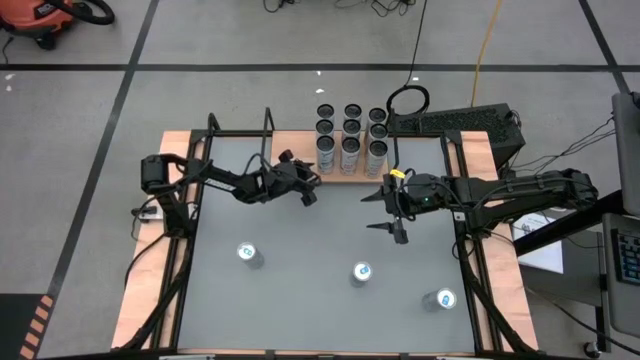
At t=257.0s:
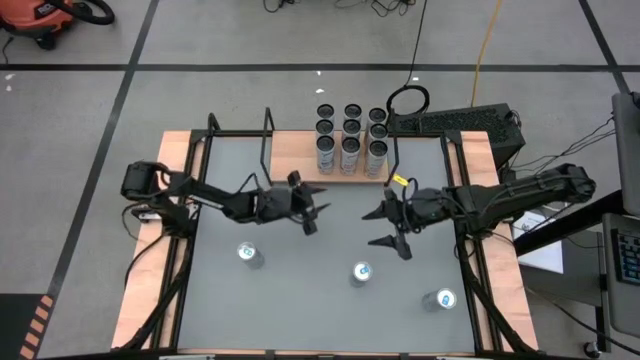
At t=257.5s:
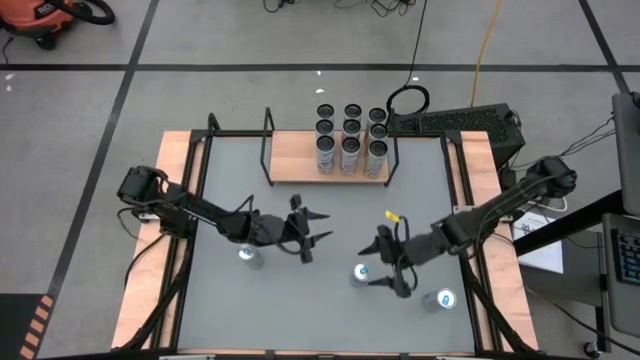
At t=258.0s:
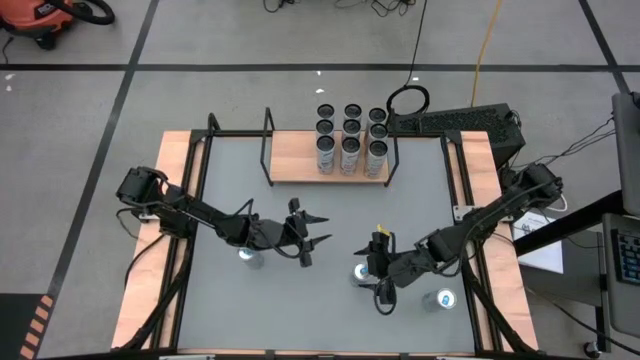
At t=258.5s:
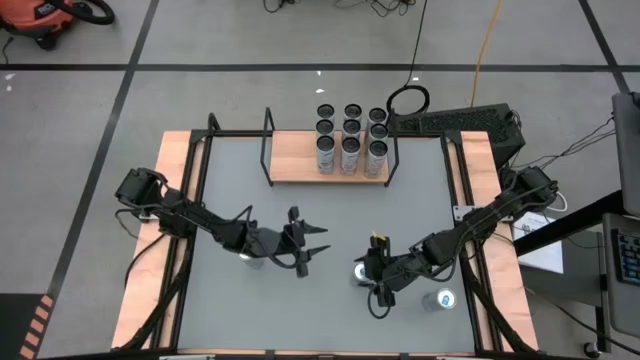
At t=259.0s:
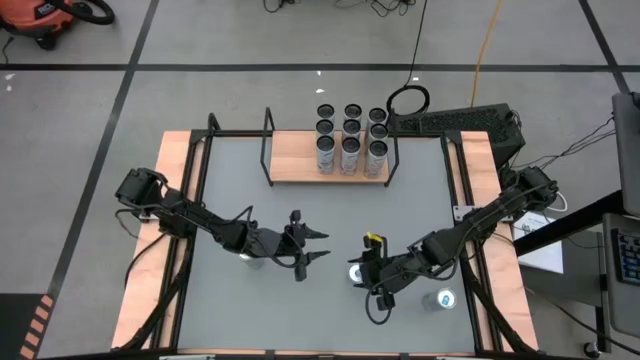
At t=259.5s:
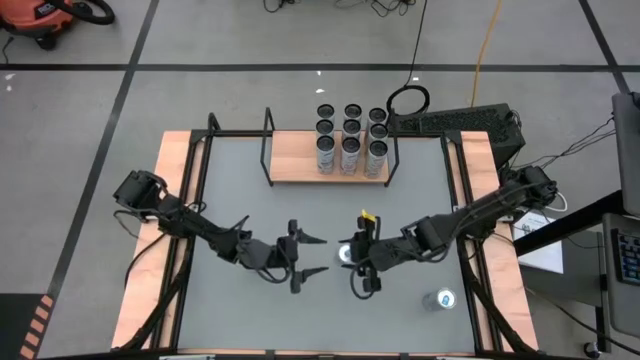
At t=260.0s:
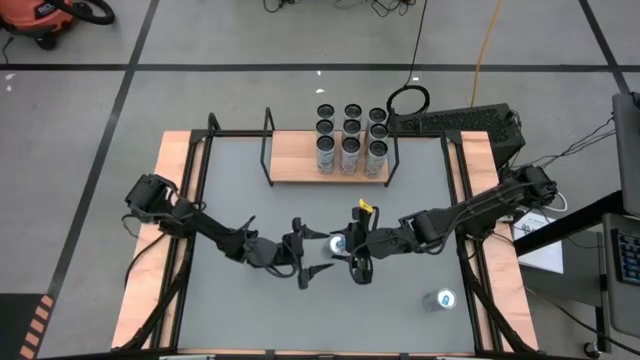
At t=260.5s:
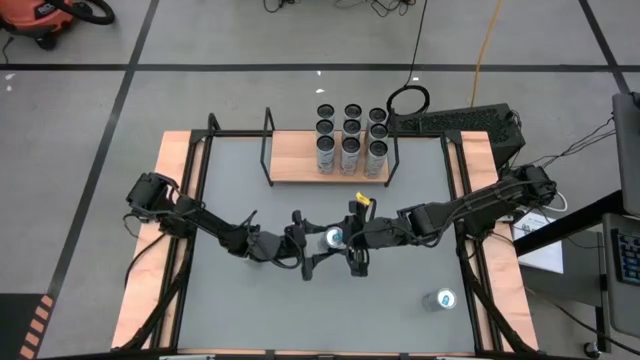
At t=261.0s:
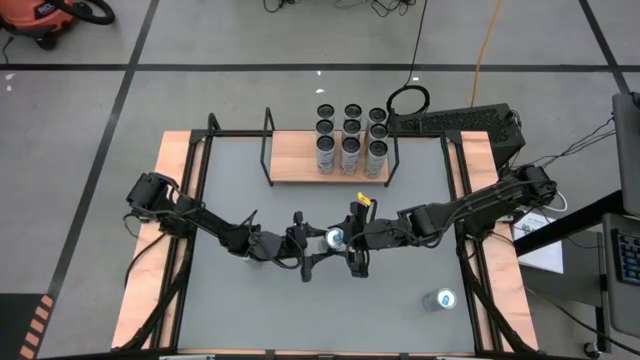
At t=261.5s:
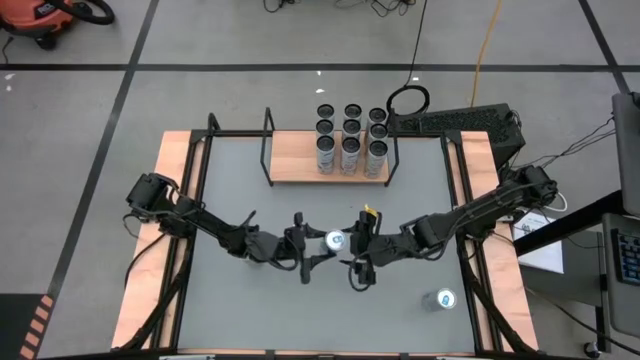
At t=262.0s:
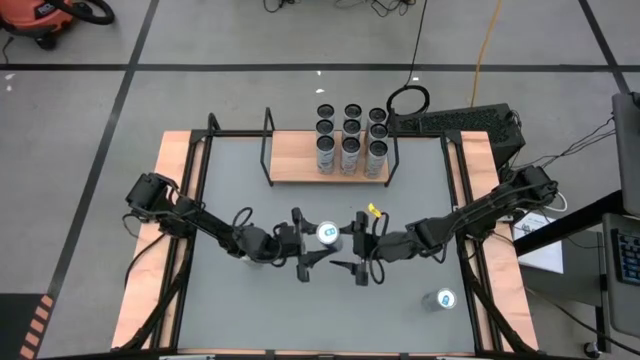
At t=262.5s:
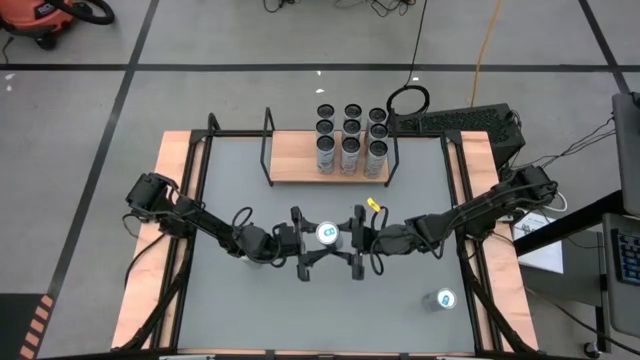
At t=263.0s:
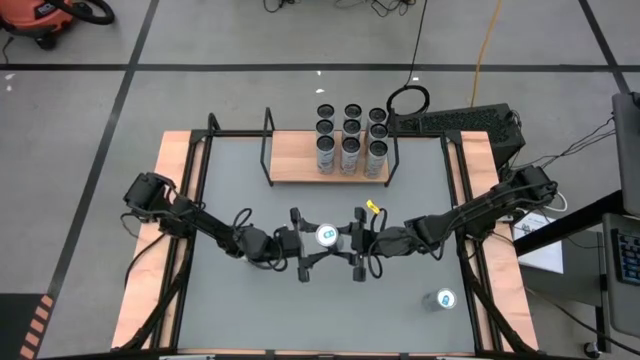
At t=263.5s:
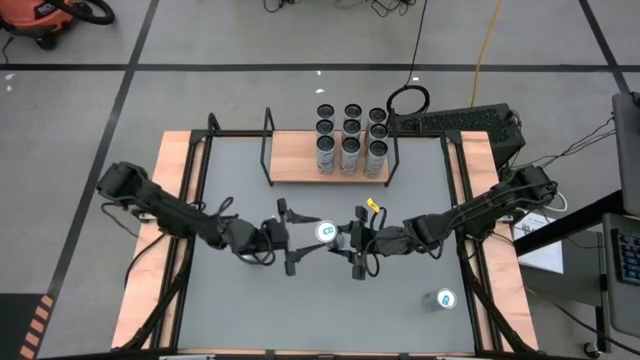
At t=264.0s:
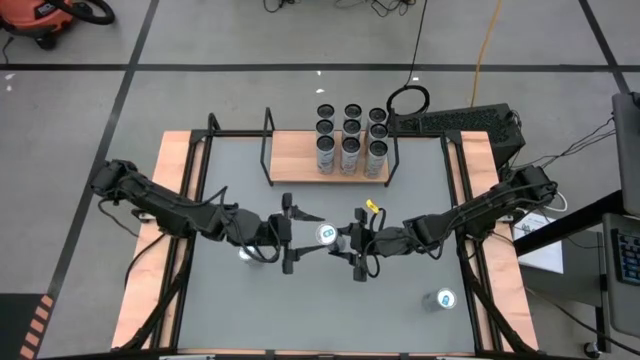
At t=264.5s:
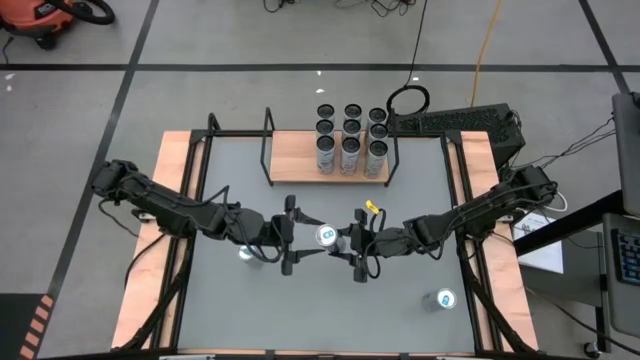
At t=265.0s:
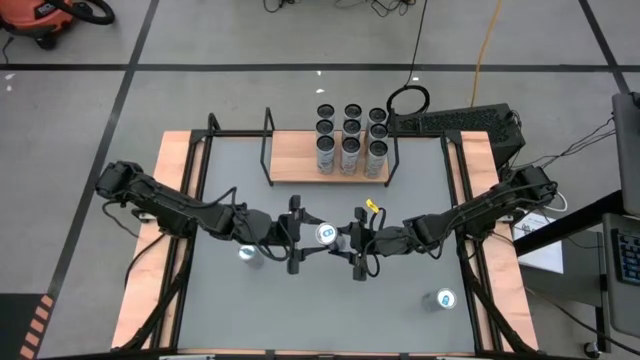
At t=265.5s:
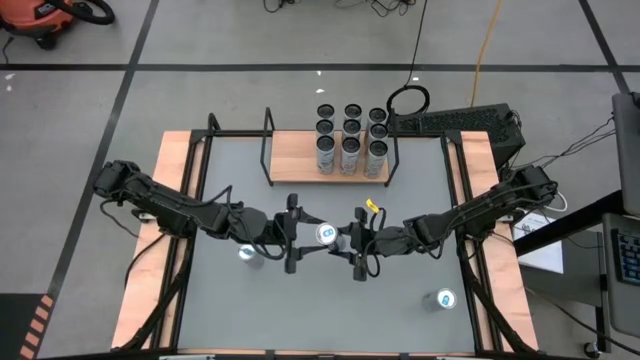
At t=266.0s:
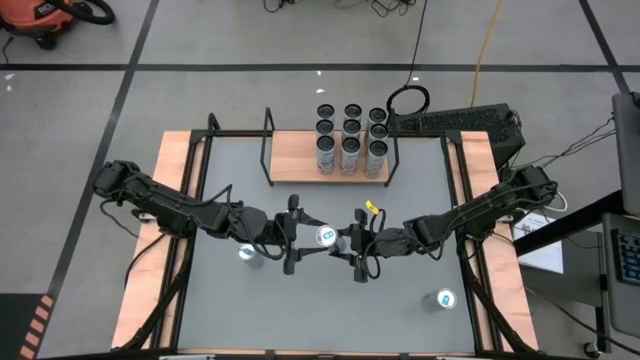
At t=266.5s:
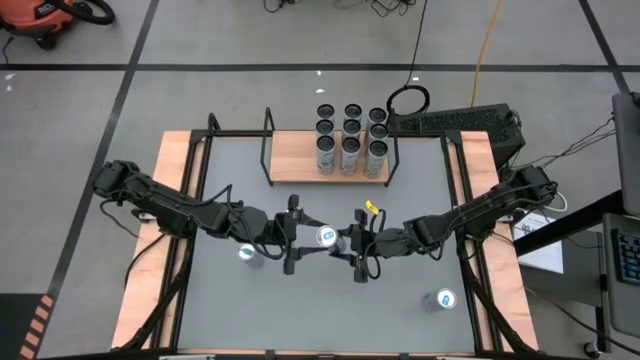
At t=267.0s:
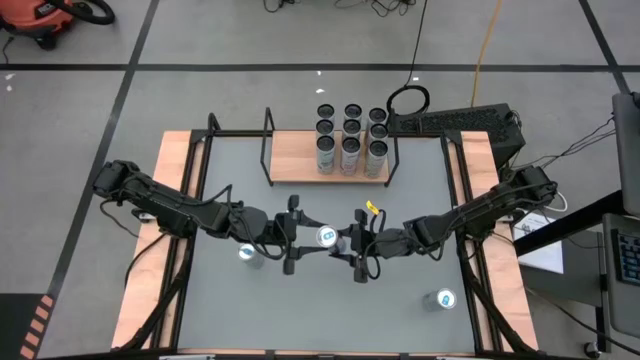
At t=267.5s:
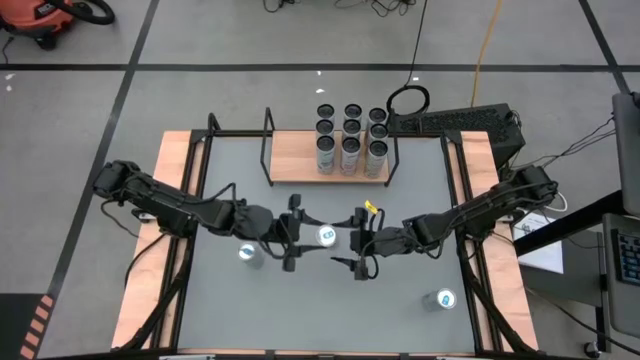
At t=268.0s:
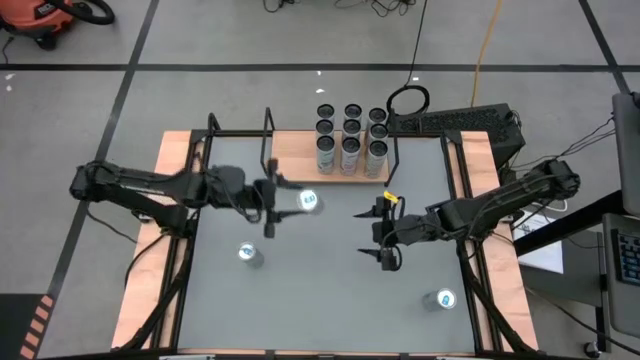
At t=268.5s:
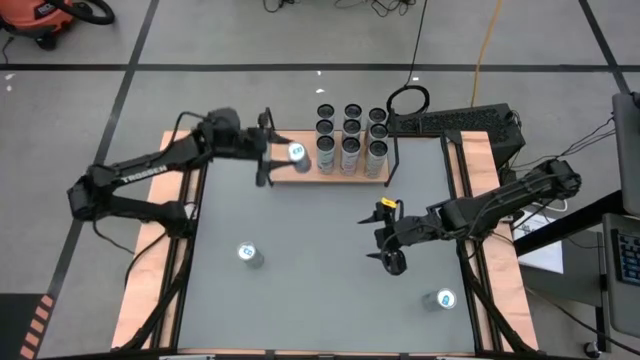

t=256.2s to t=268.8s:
Task: Place canned beverage on shelf
Put the middle blue soda can on the shelf

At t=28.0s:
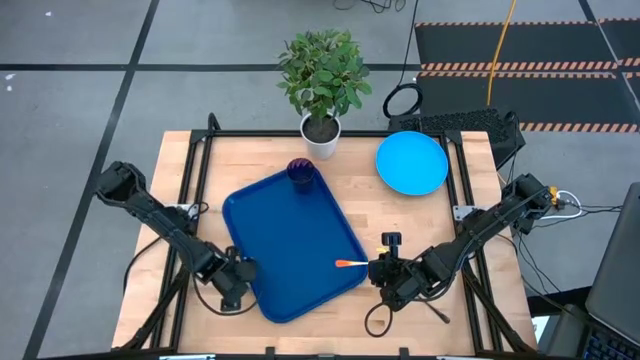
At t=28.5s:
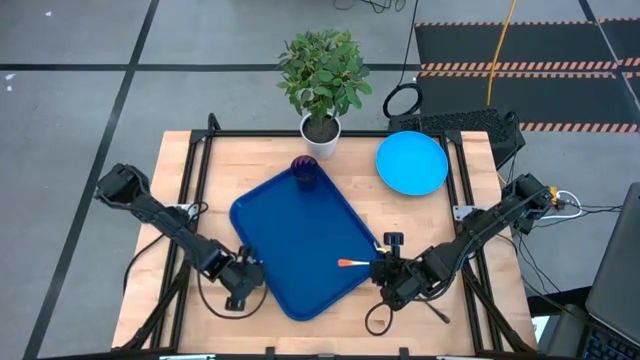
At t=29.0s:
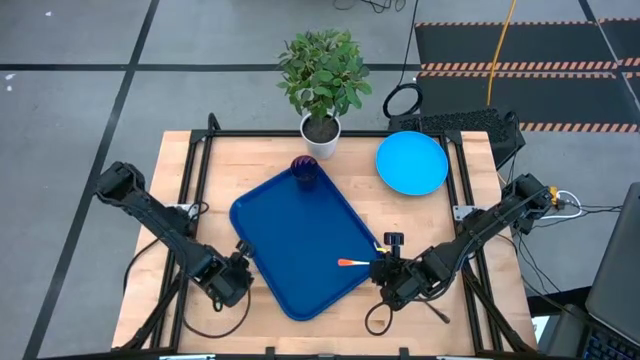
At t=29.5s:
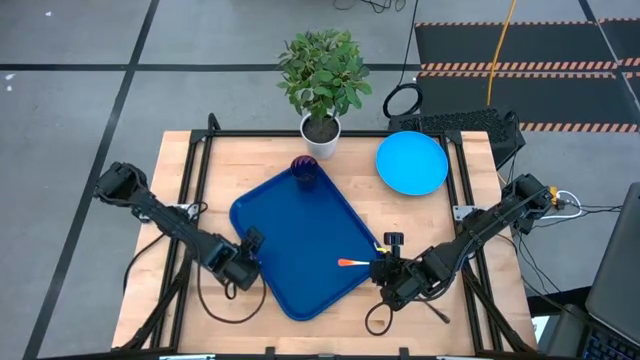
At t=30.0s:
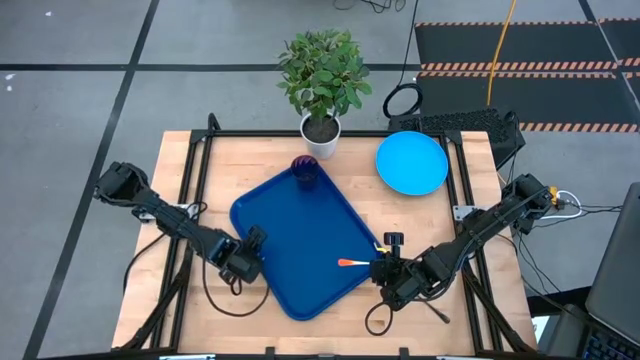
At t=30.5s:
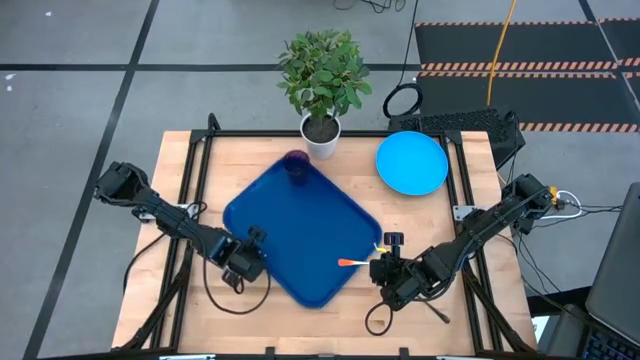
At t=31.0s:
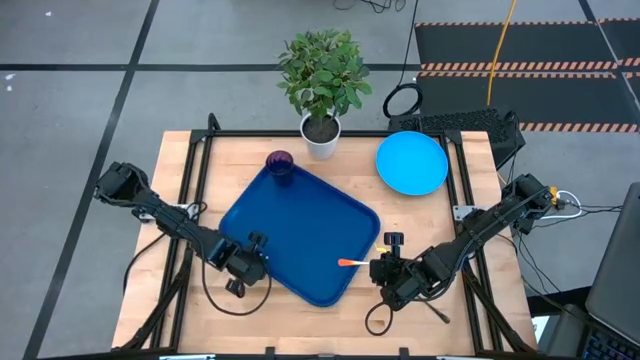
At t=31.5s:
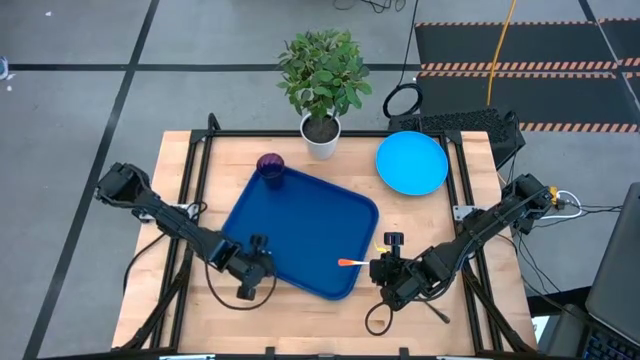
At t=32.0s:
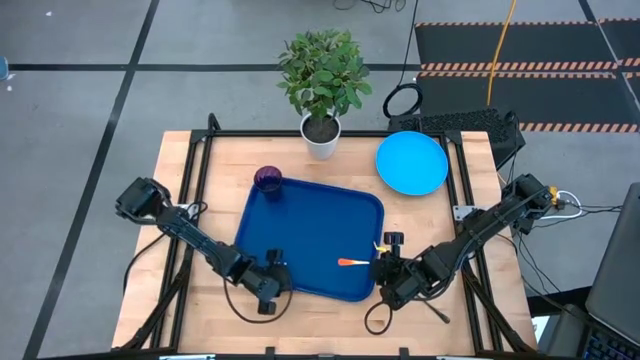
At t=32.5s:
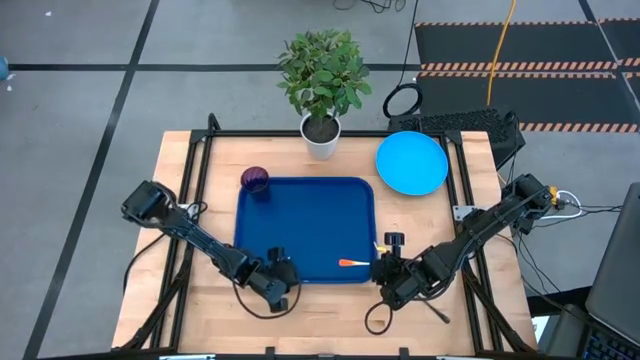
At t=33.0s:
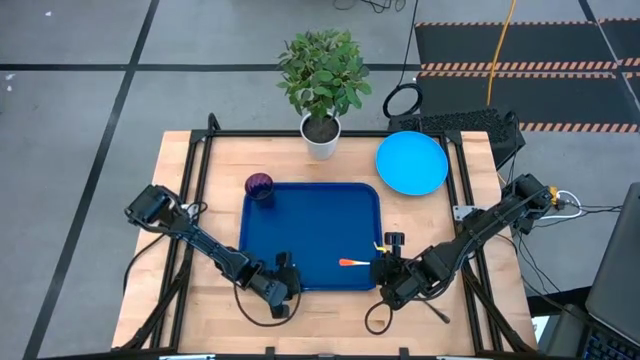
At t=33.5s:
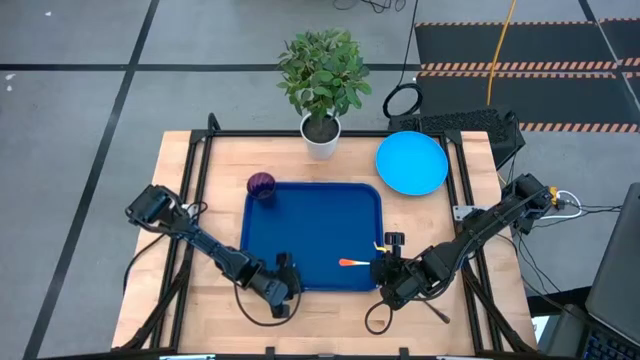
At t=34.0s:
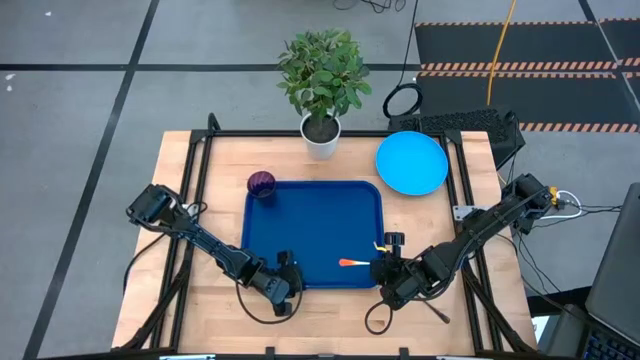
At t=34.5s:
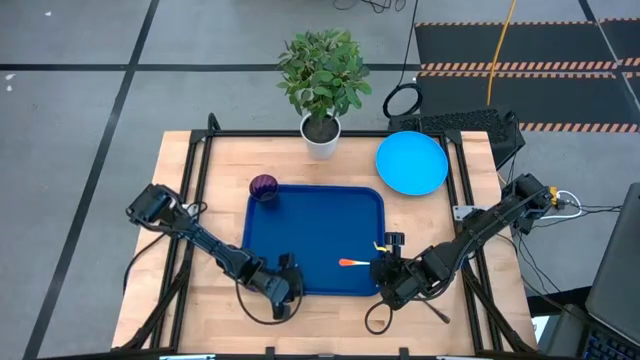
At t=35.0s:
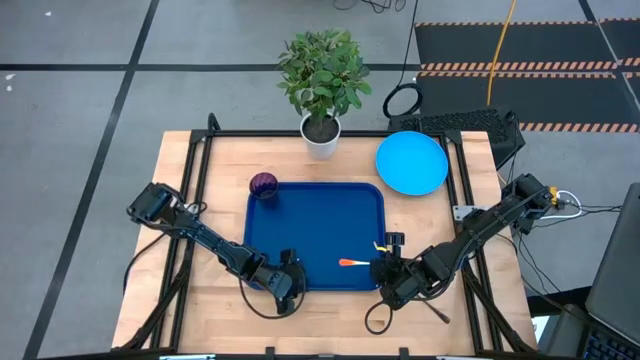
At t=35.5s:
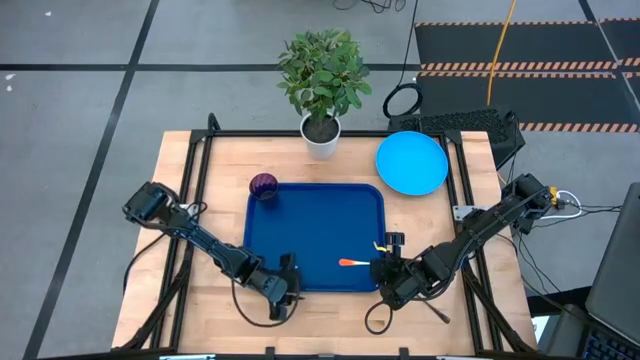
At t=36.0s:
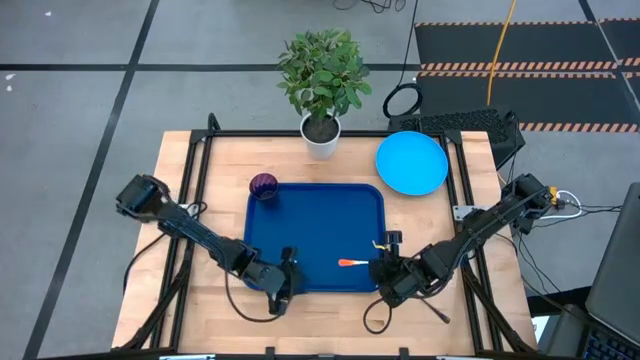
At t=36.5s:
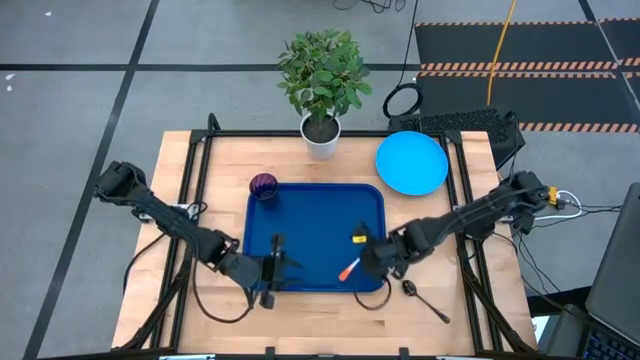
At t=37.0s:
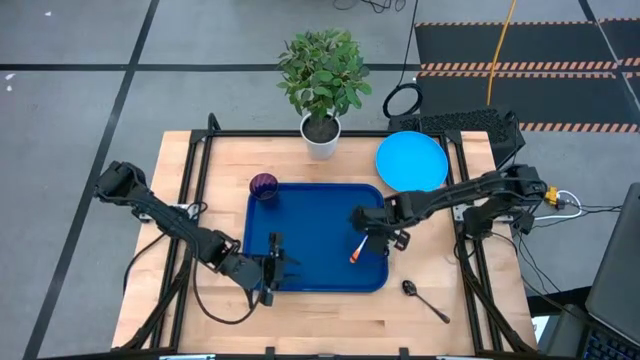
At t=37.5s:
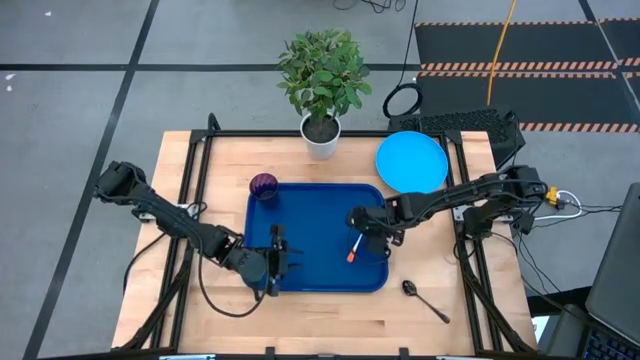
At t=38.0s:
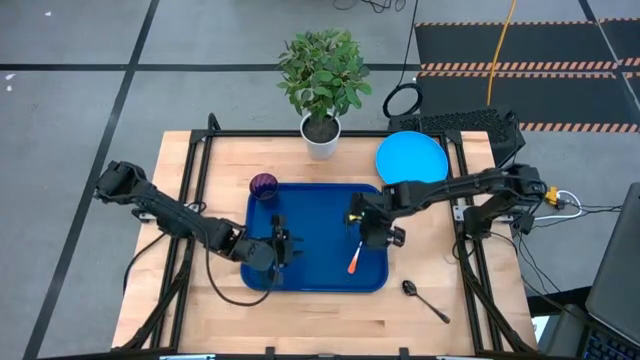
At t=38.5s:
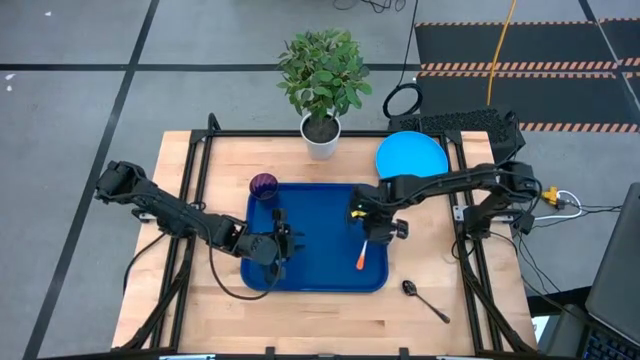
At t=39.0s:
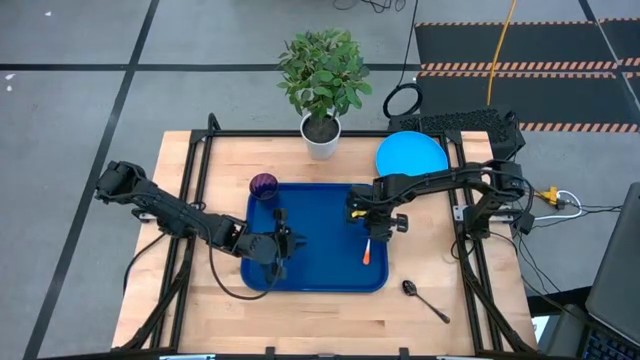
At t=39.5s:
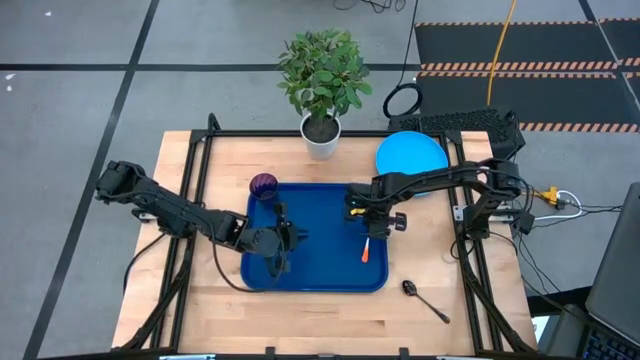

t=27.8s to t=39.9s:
Task: Pick and place plate/cup/fork/spoon on tray
Put the orange fork on the blue tray
